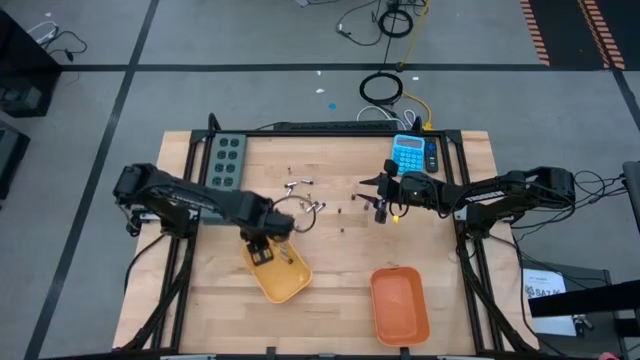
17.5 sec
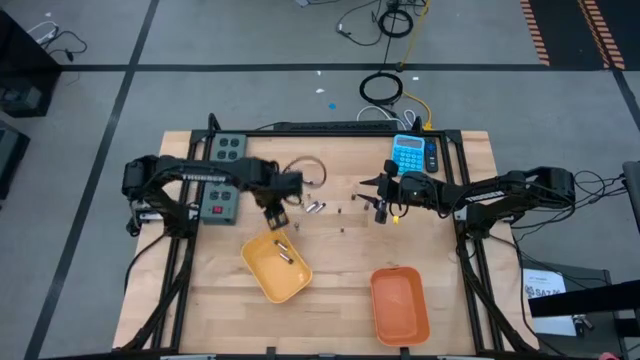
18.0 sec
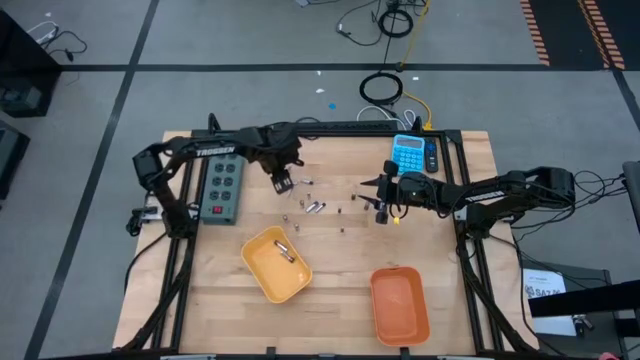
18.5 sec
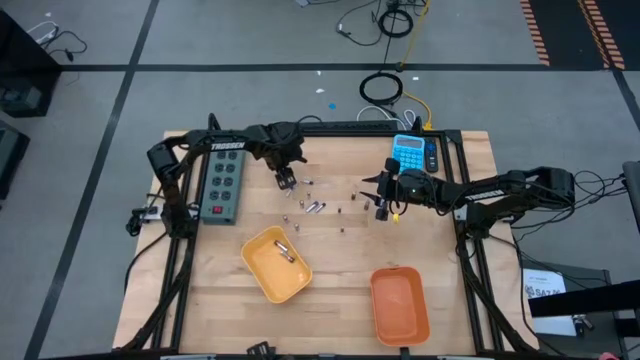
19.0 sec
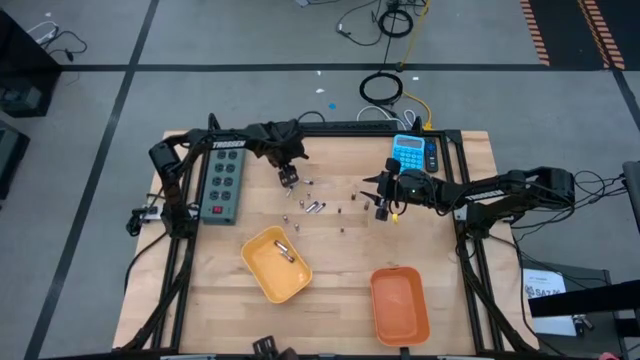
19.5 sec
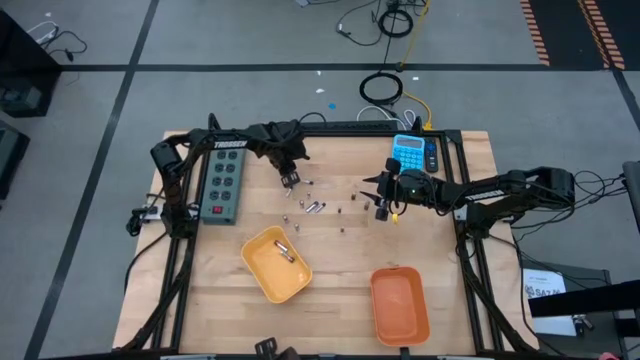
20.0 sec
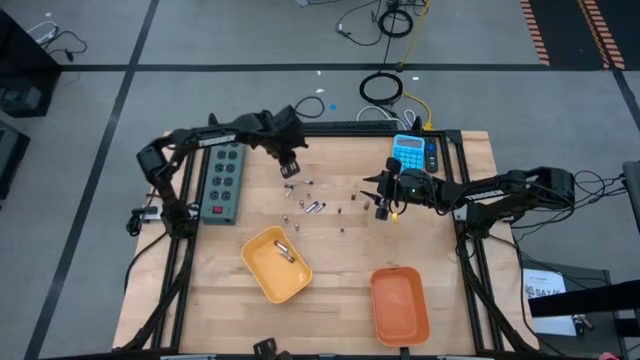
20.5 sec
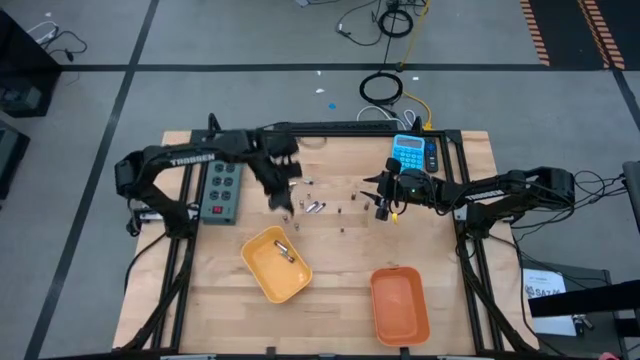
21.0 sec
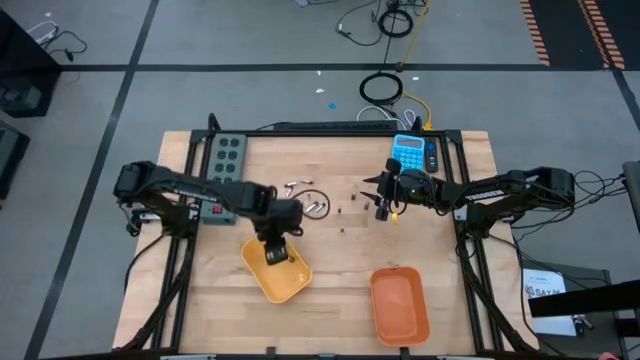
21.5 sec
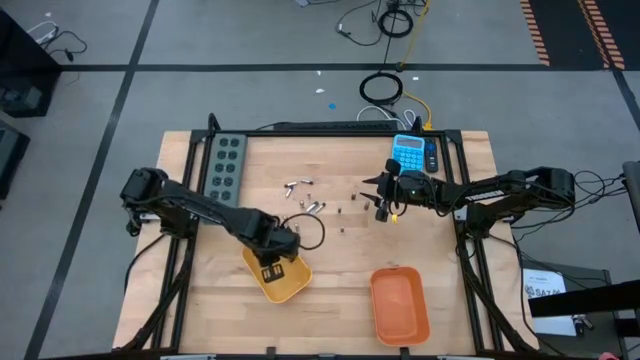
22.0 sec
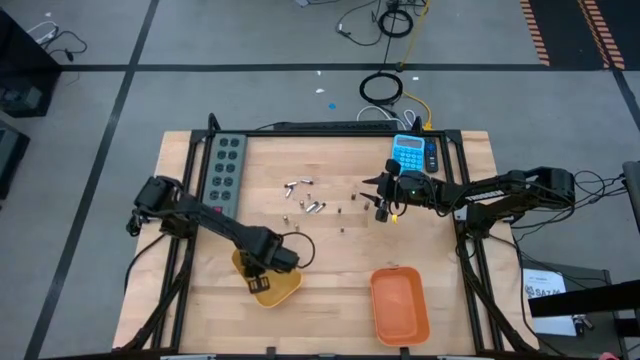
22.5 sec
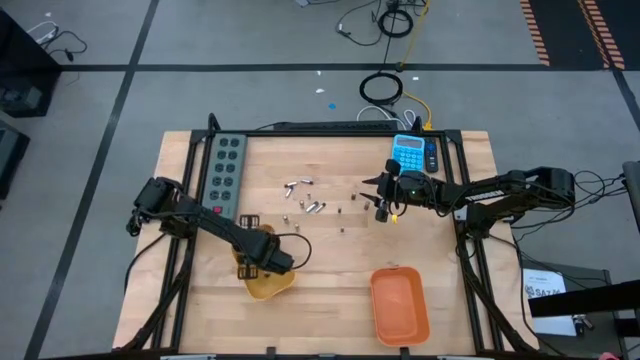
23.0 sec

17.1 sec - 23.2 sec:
Task: Sort batteries
Put the silver battery into the yellow bin

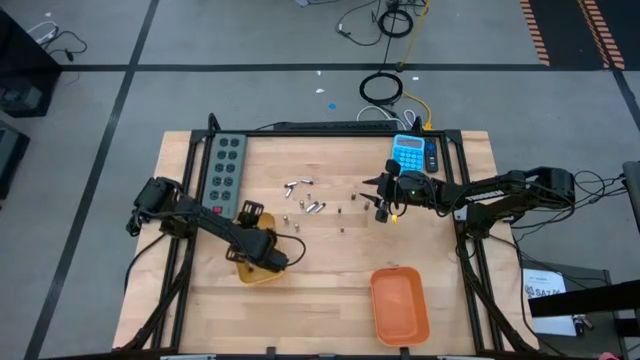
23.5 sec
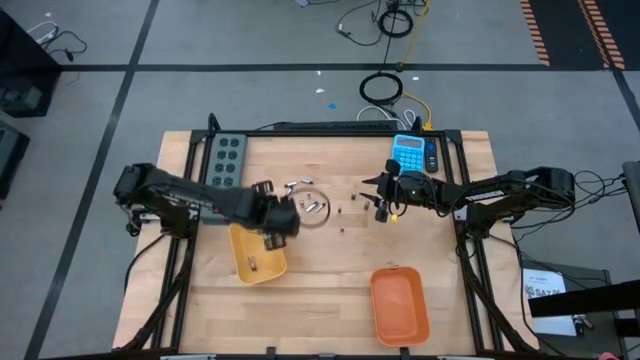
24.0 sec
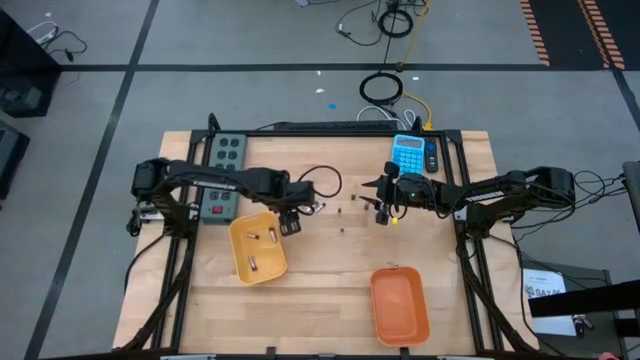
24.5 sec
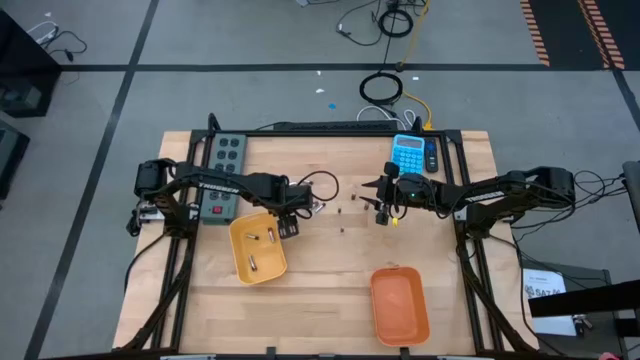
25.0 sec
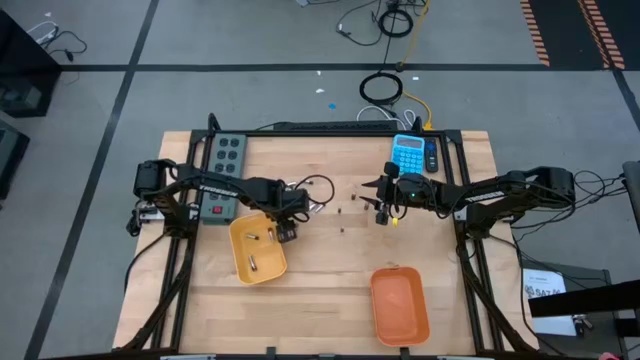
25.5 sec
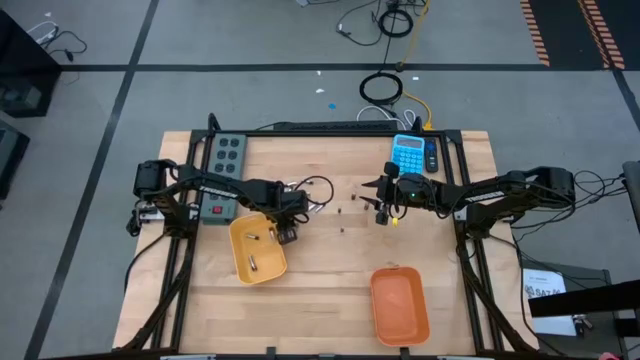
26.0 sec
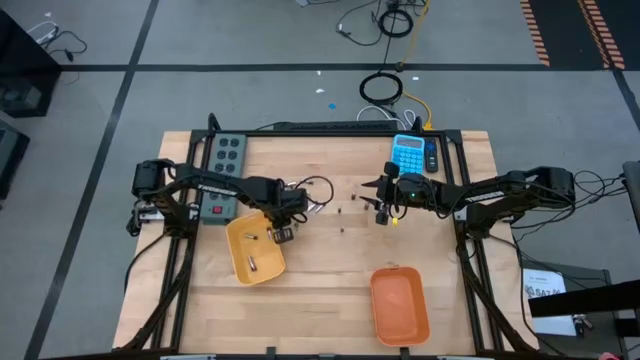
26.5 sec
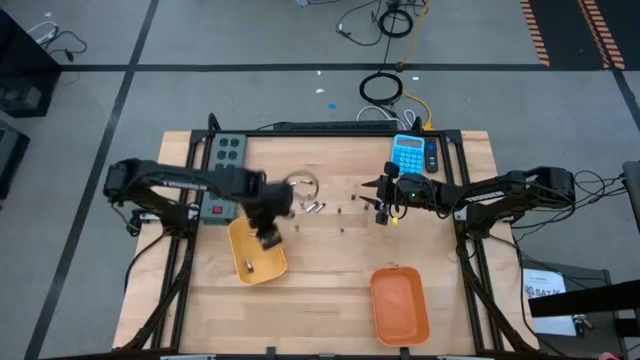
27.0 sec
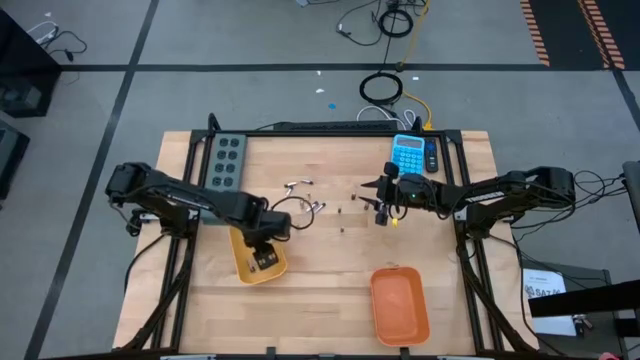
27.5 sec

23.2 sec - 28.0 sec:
Put the silver battery into the yellow bin

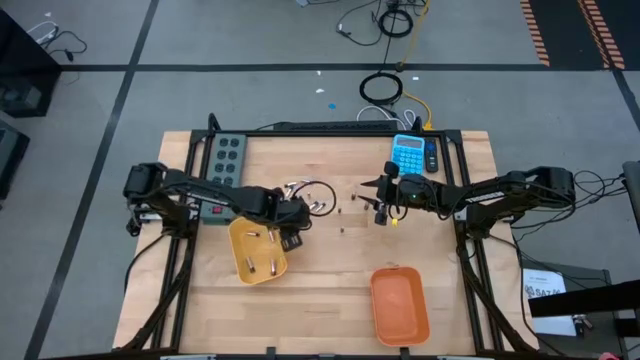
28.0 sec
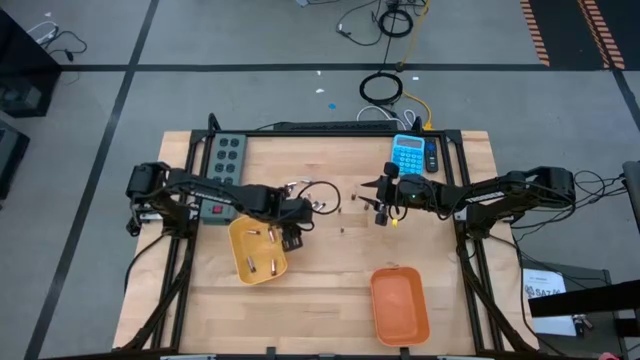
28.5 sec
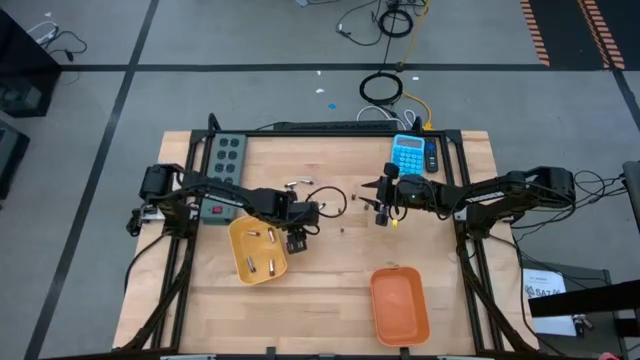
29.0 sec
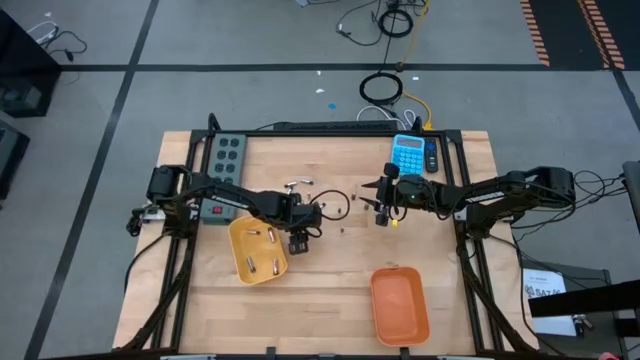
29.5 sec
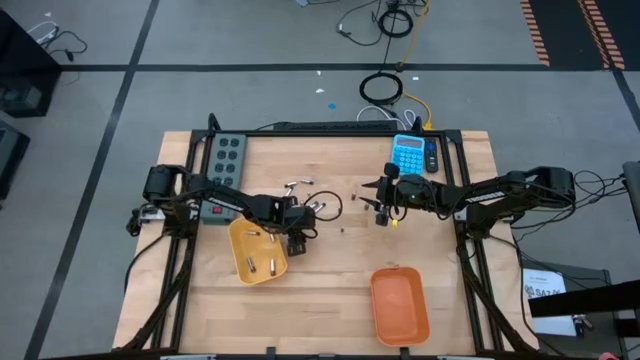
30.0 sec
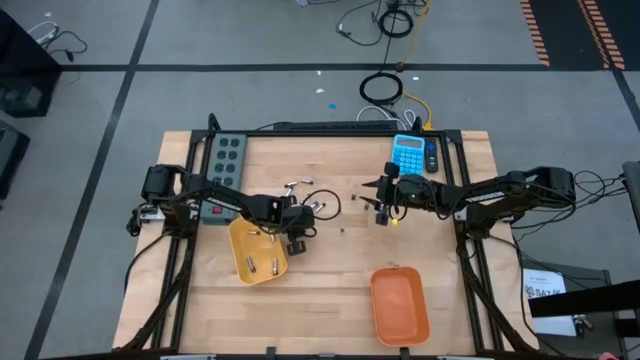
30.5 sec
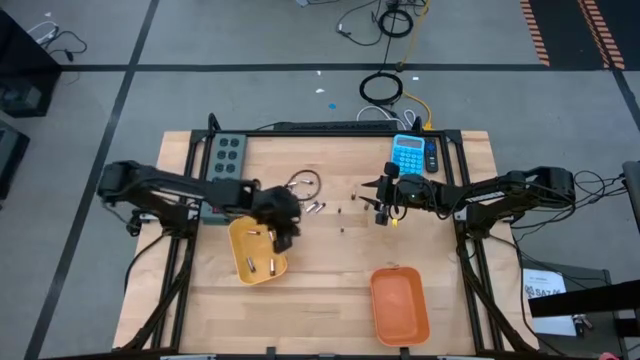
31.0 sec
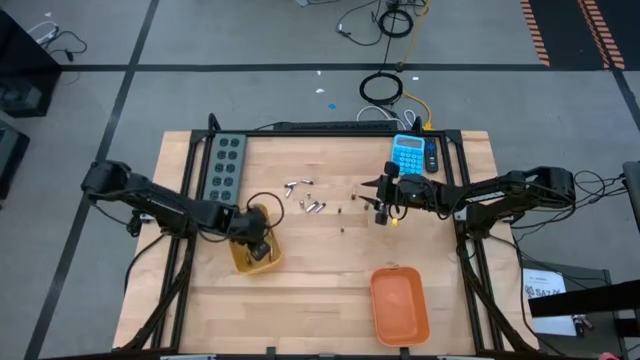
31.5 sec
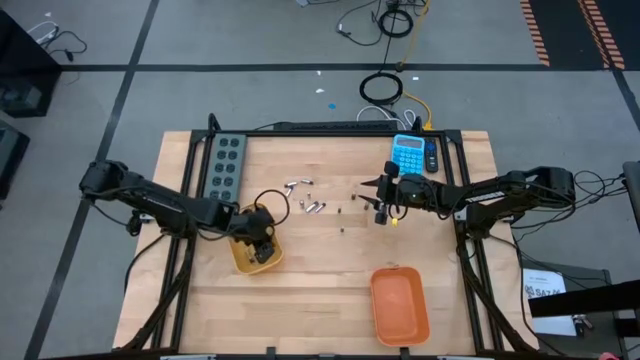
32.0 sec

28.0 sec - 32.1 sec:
Put the silver battery into the yellow bin

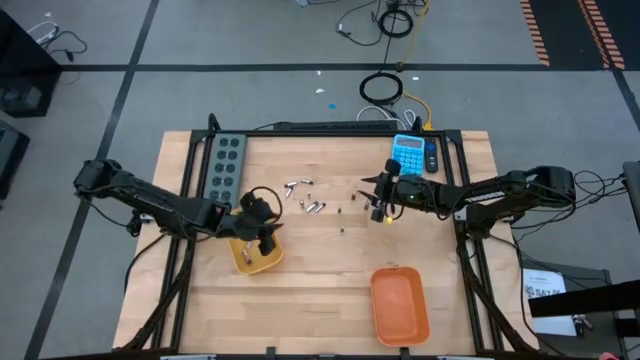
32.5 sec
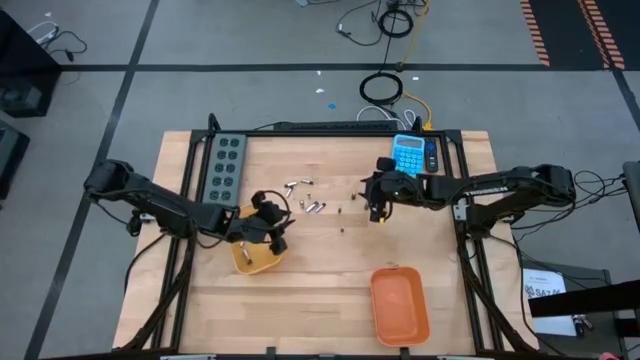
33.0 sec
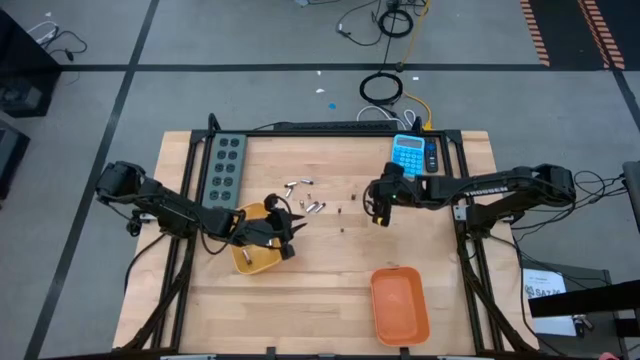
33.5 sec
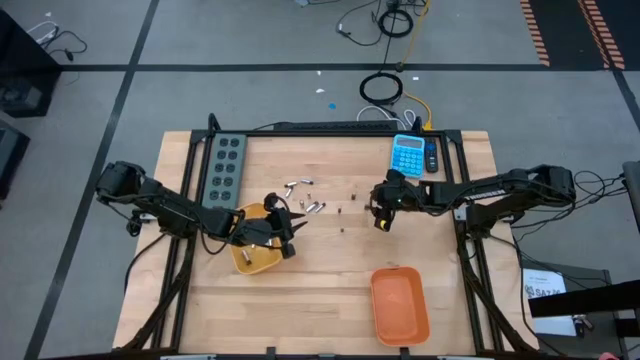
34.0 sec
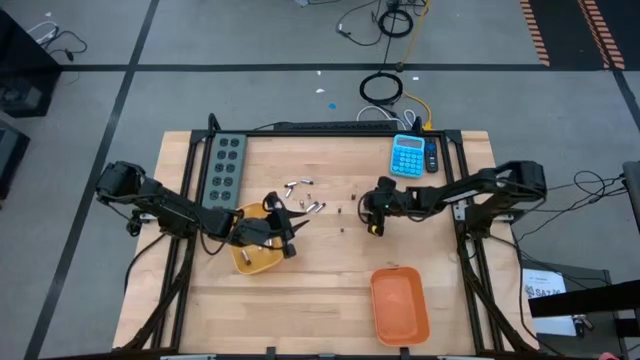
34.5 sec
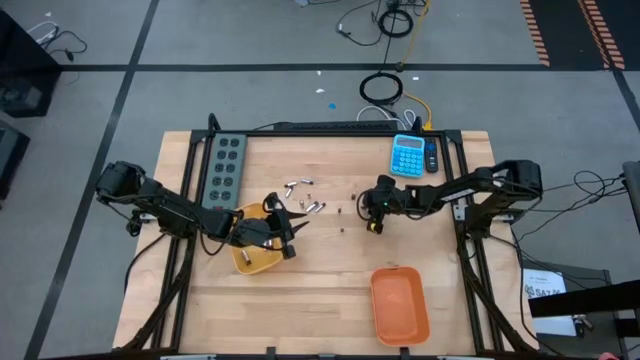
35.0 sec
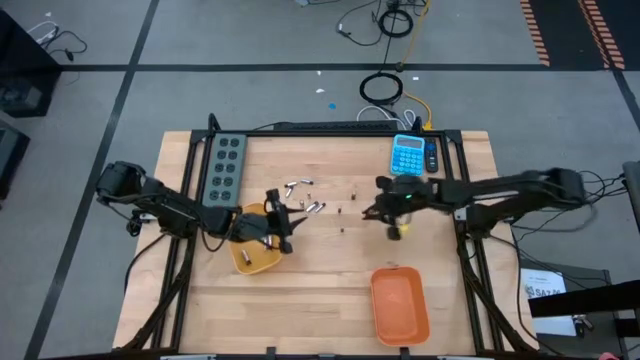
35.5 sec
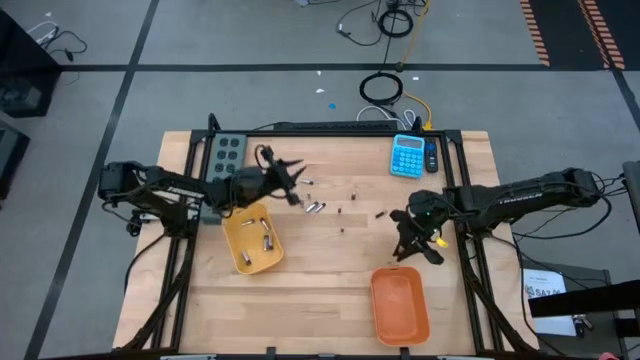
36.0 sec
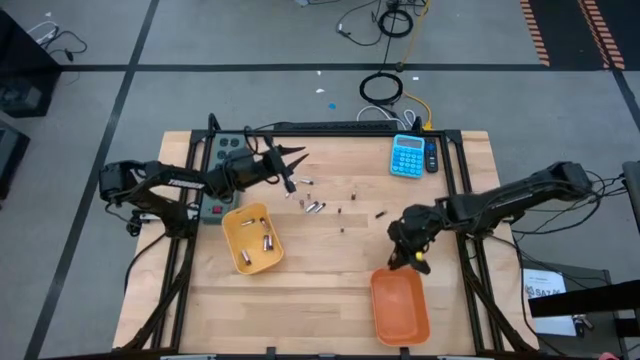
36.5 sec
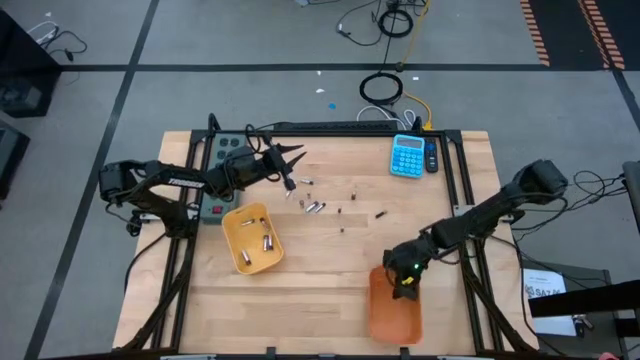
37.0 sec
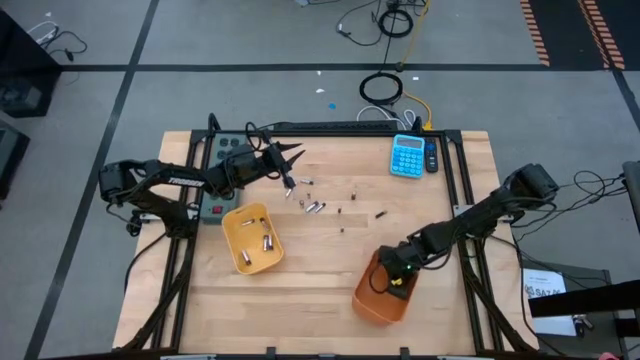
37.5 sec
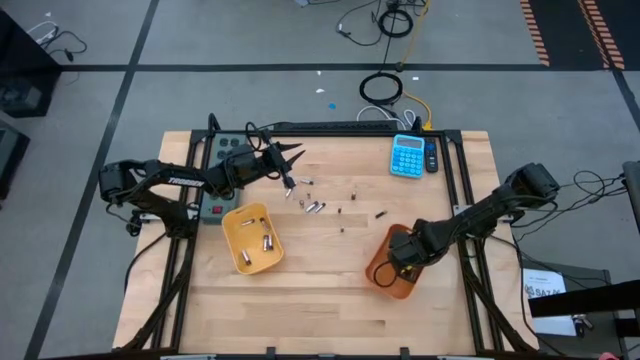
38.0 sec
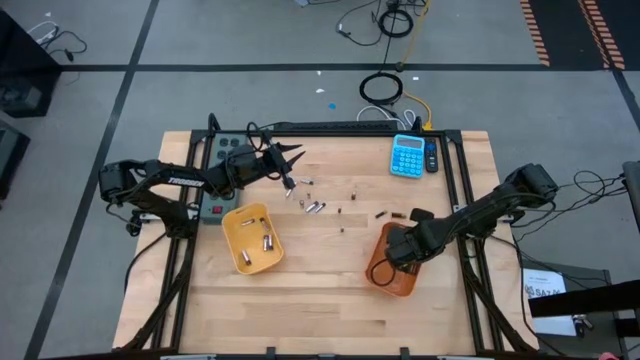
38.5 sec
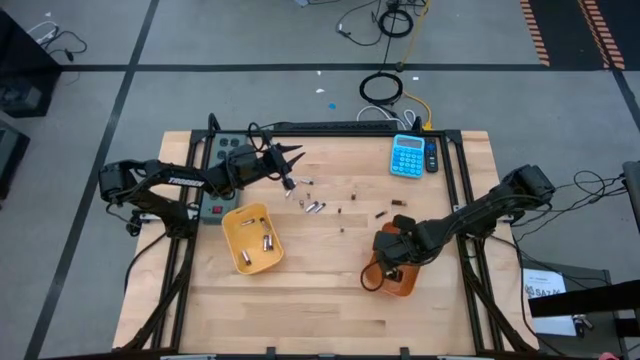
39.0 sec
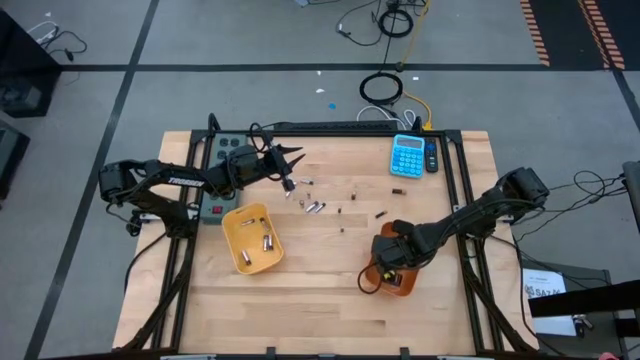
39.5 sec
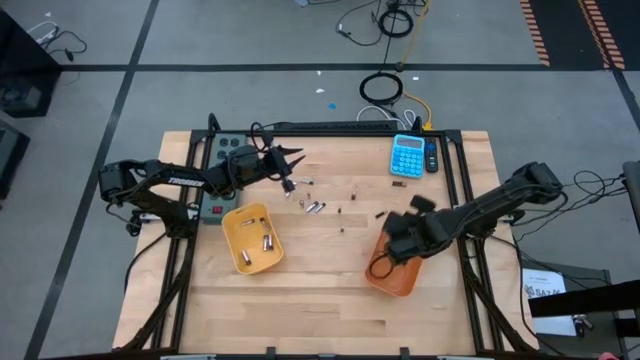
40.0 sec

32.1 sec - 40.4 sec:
Put the black battery into the orange bin
